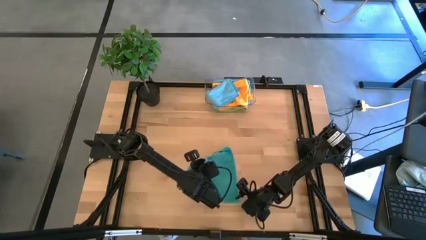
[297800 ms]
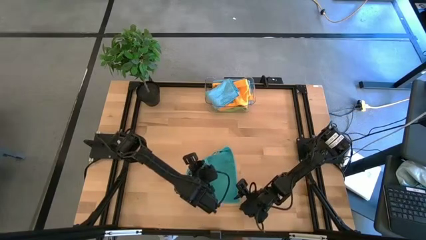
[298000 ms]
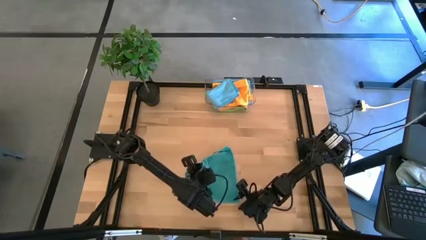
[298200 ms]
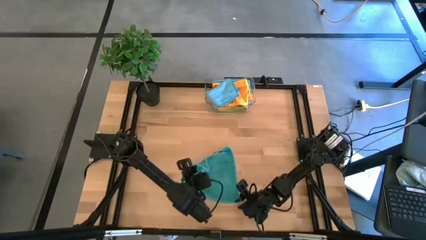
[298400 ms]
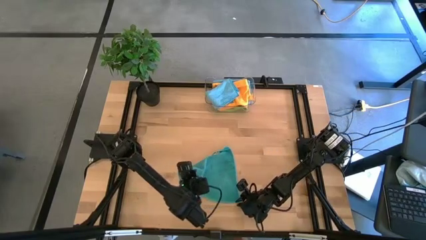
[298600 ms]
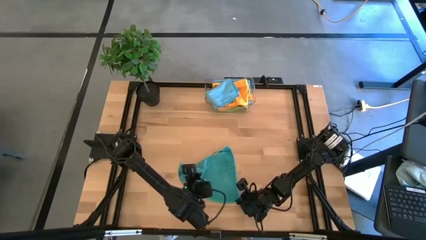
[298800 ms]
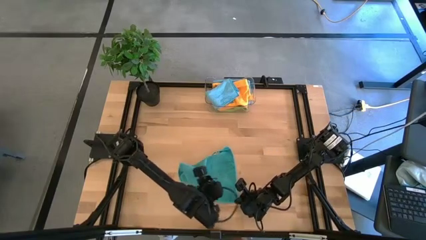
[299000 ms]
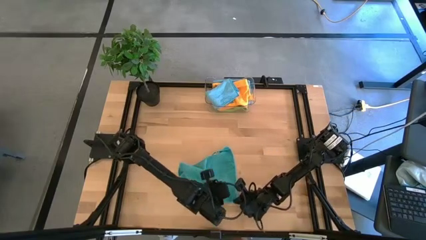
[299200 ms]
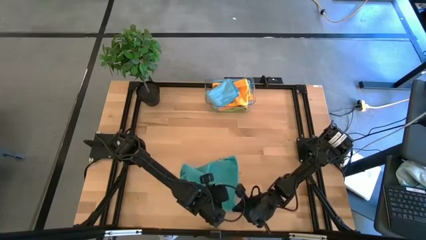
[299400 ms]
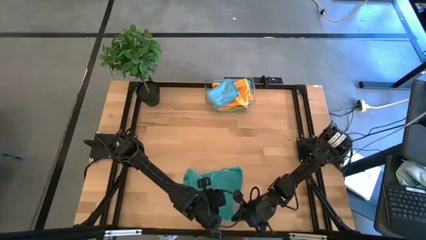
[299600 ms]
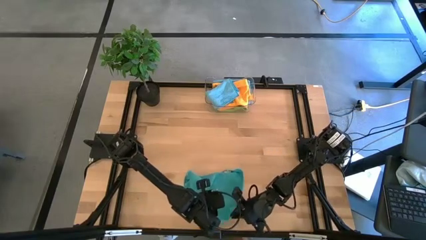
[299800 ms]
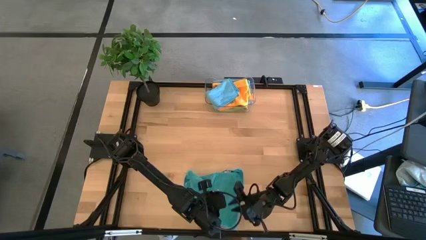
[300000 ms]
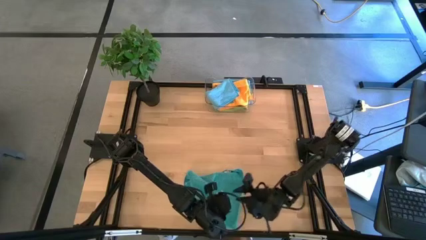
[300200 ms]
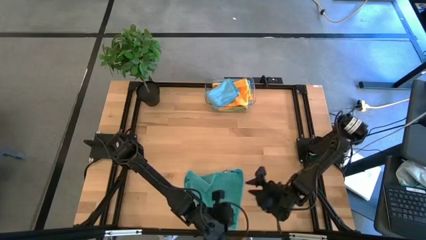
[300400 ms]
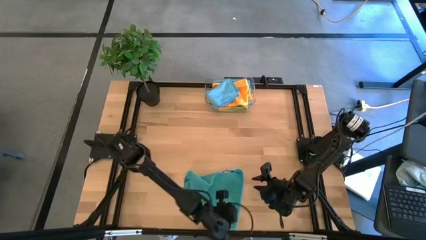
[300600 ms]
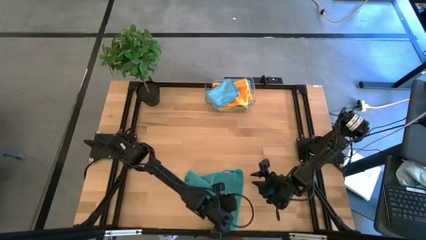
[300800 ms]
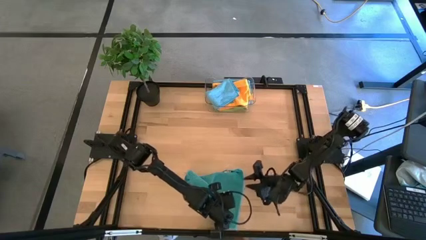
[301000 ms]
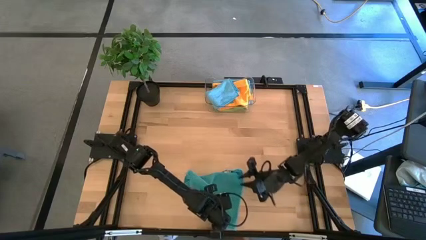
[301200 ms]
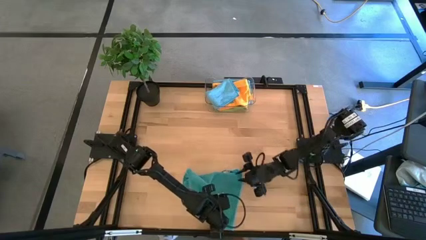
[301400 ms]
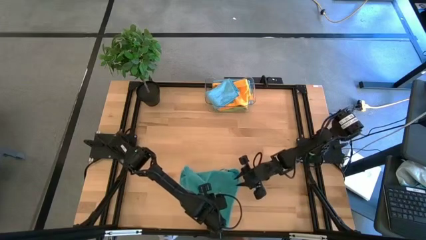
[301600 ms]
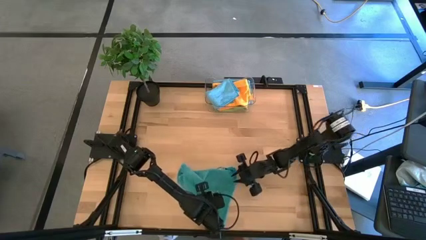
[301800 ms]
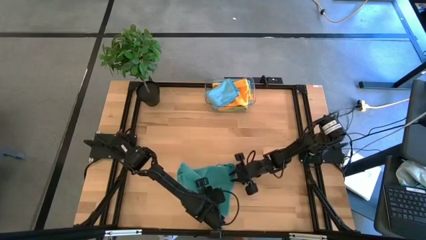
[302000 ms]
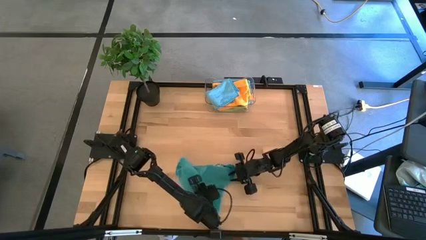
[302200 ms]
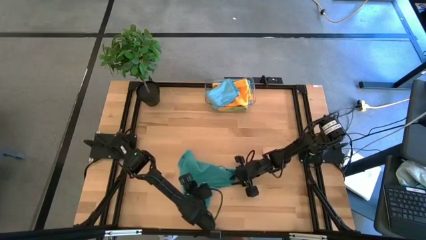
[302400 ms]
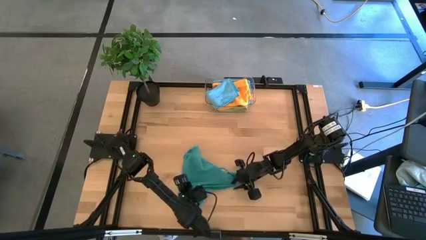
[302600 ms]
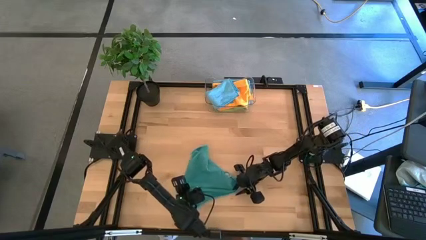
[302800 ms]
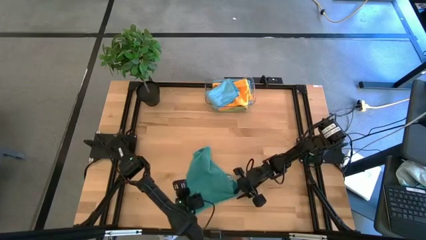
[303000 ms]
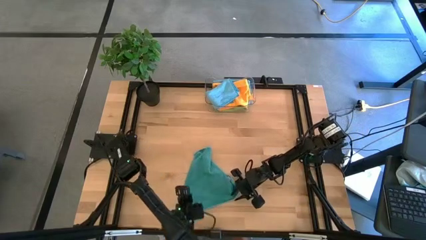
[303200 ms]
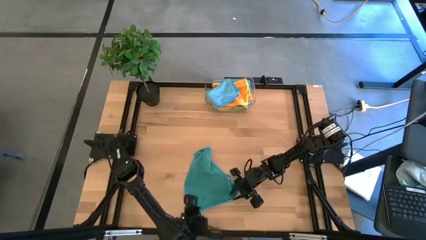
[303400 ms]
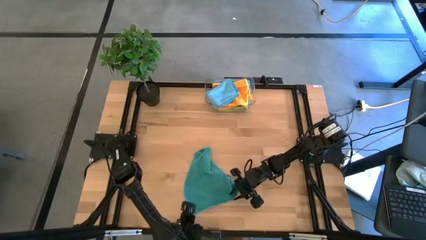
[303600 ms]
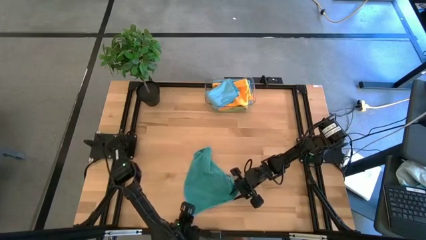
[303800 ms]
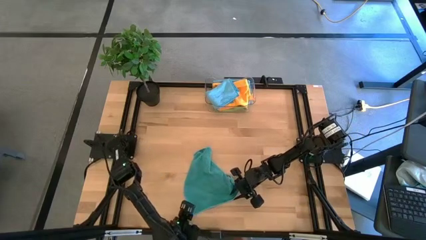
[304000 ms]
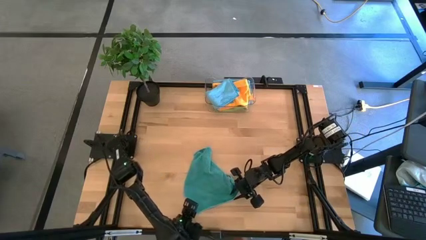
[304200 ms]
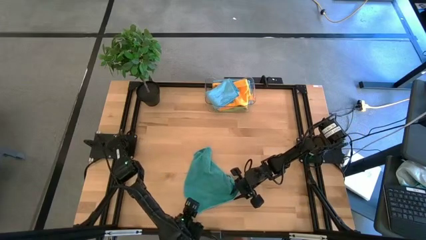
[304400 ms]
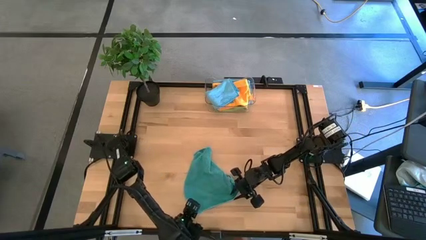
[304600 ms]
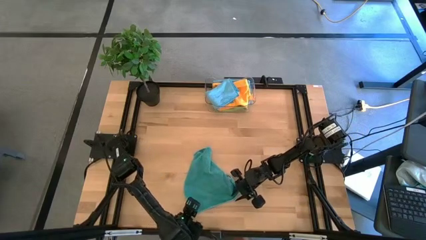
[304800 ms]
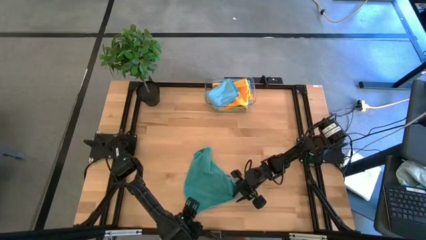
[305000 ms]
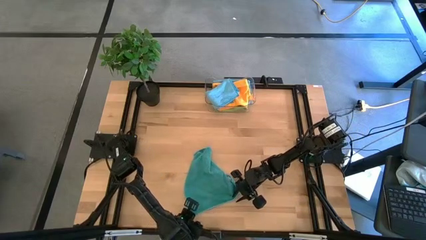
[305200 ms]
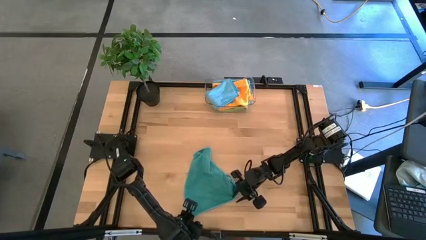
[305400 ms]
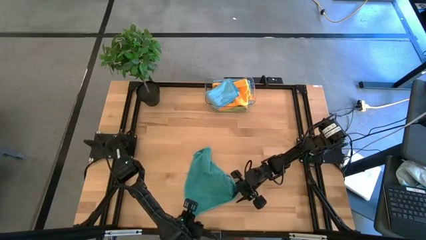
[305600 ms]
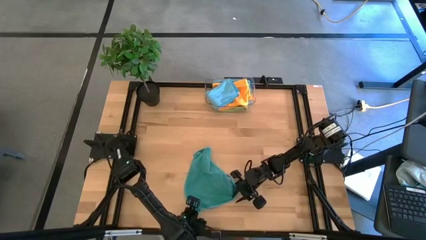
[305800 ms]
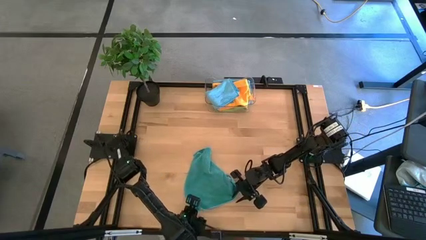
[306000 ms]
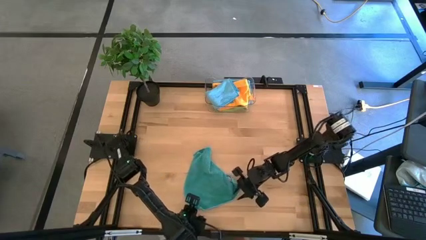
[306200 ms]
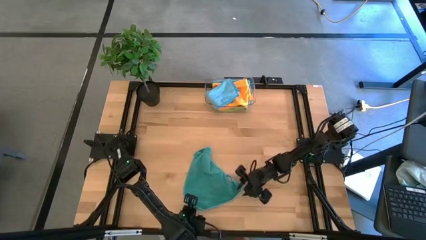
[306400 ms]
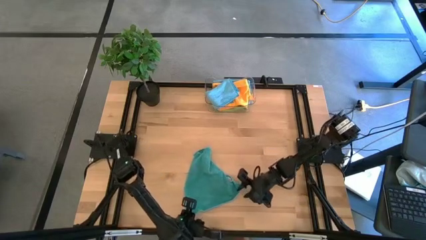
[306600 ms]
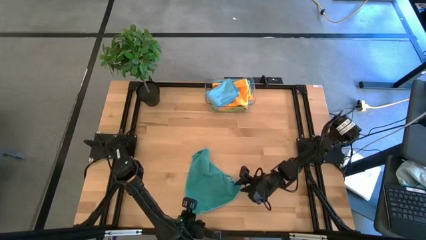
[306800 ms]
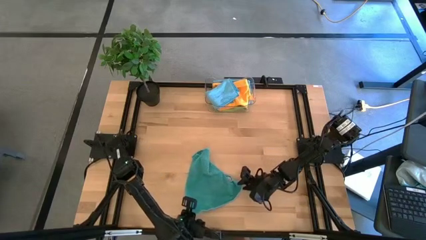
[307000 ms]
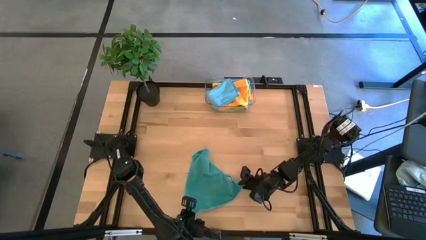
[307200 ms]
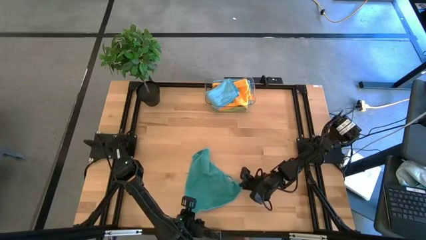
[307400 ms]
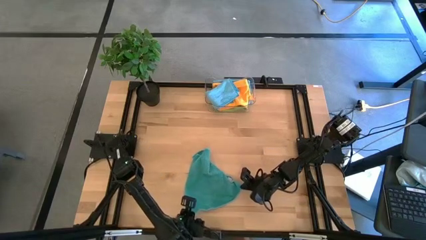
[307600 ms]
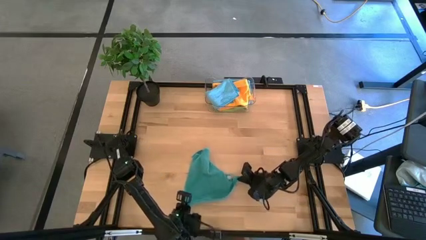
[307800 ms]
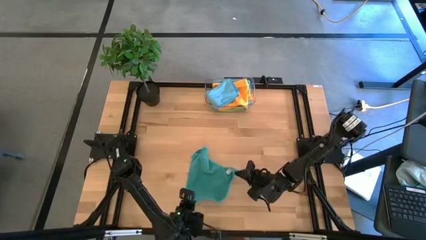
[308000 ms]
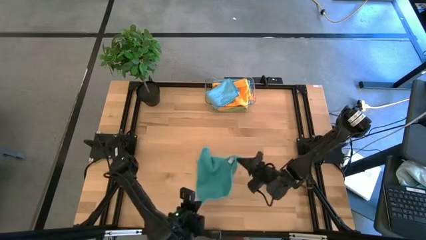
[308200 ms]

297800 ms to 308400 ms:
Task: Fold microfiber towels
Fold the blue microfiber towel

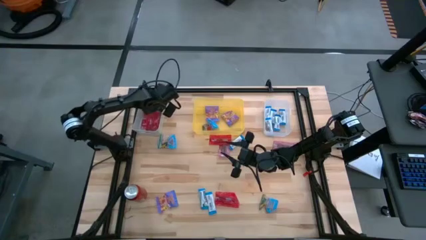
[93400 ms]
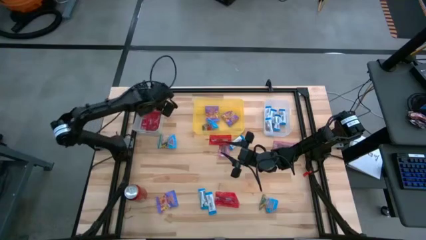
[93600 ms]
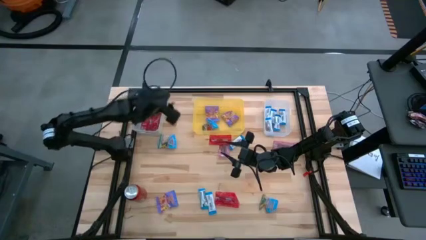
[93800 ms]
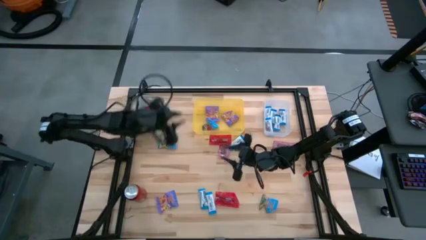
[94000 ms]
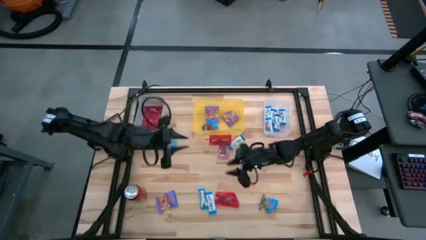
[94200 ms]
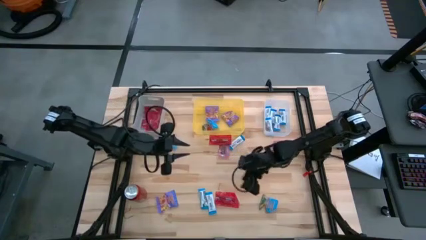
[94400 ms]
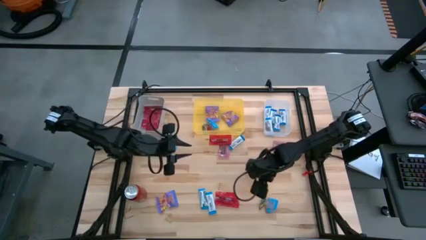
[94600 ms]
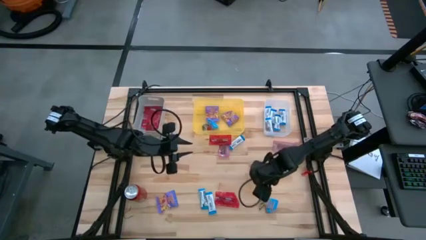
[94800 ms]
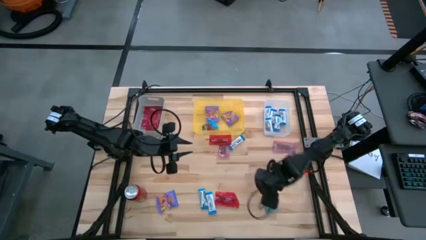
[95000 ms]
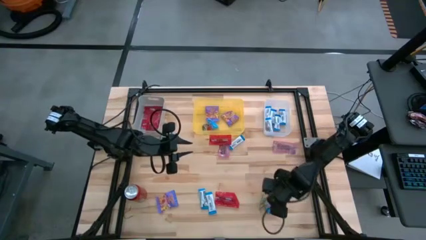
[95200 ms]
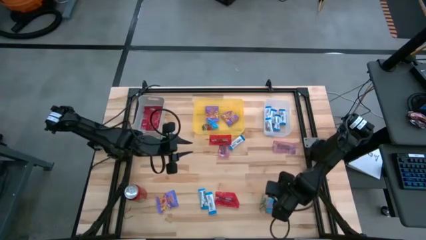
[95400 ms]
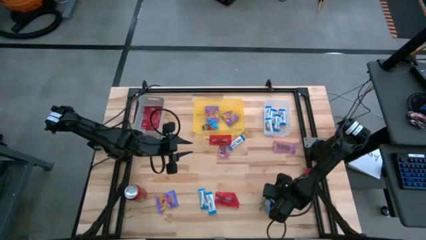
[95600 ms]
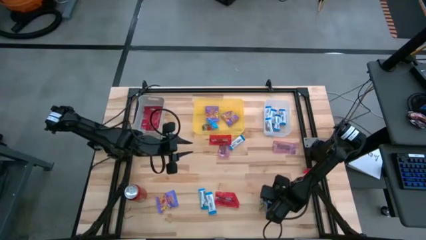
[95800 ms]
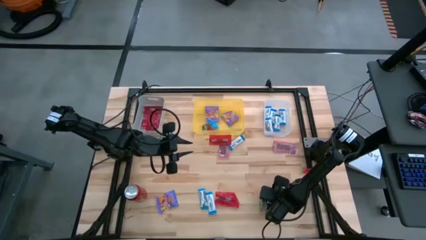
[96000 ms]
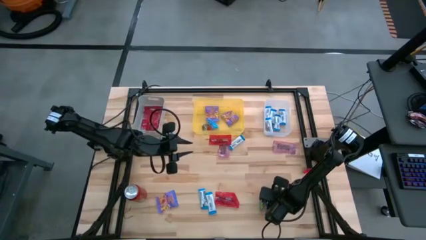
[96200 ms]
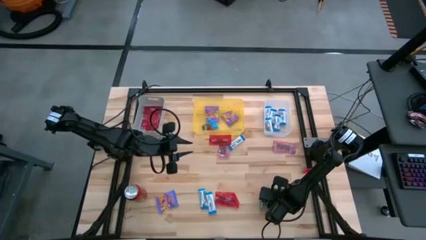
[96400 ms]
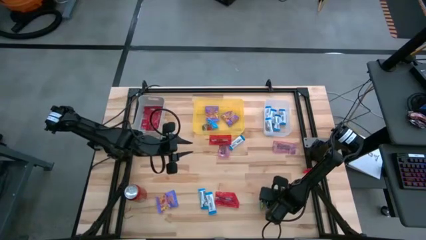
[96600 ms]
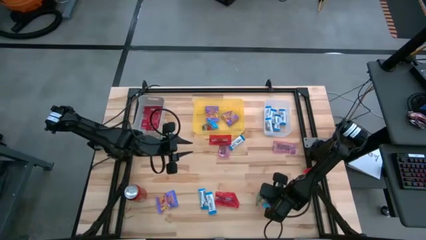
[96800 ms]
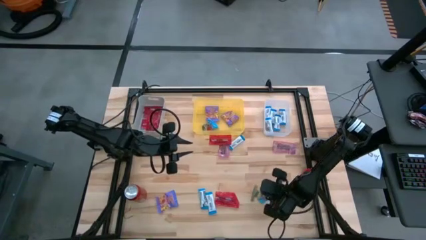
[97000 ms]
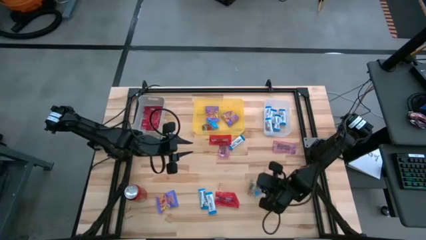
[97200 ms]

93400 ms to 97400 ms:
Task: Sort candy
Put the blue gummy into the yellow bin

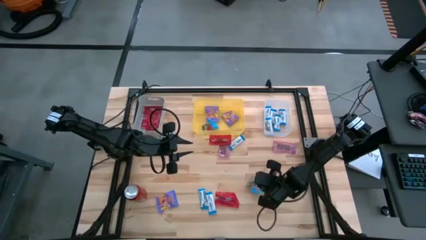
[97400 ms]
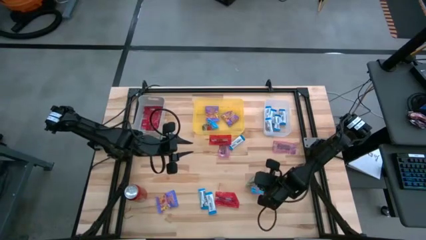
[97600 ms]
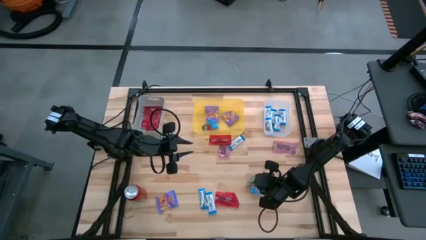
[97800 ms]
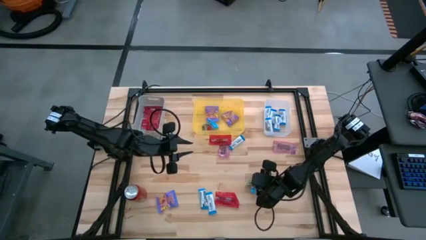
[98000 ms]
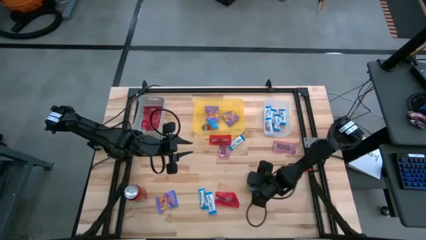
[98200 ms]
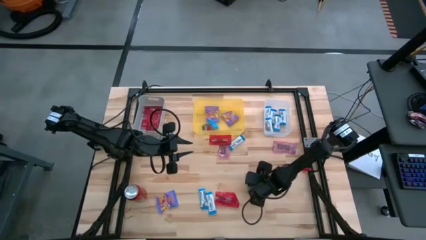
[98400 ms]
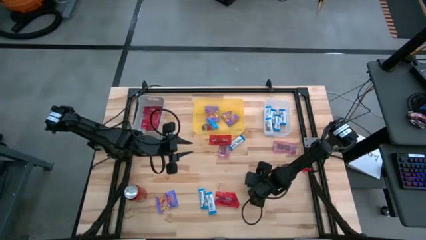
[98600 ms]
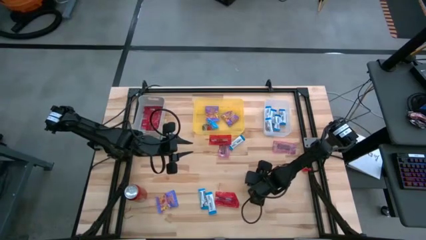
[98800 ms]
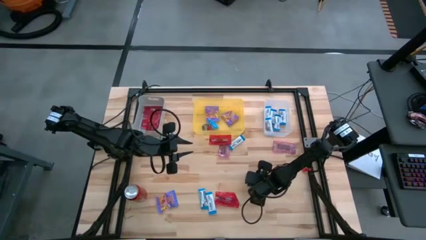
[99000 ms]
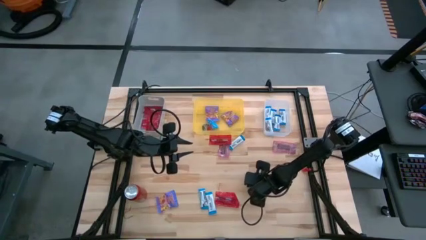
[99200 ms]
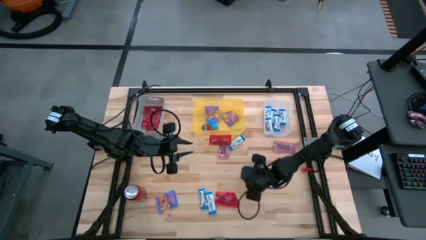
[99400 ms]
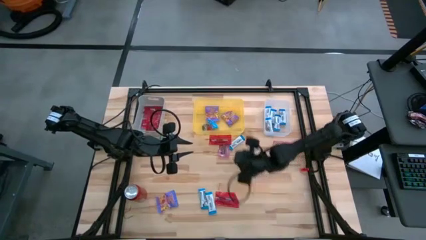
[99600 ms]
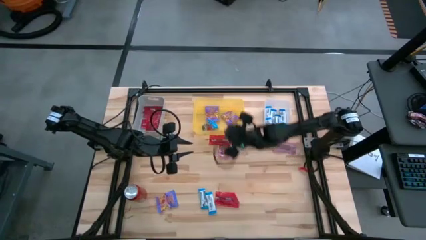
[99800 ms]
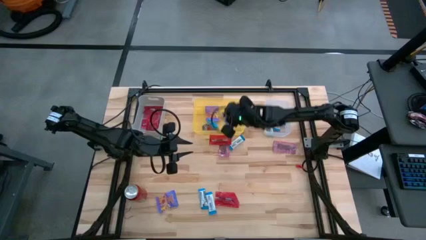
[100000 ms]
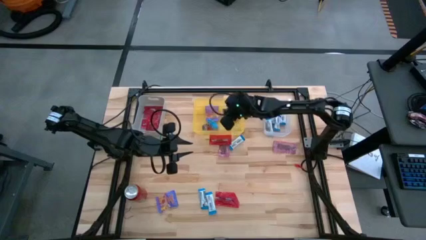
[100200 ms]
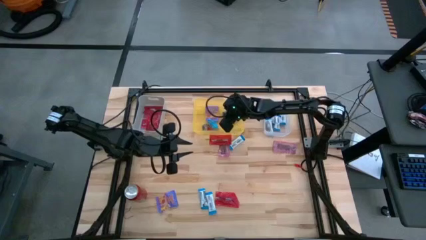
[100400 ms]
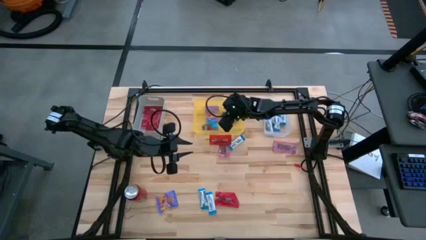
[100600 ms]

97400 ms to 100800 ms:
Put the blue gummy into the yellow bin
